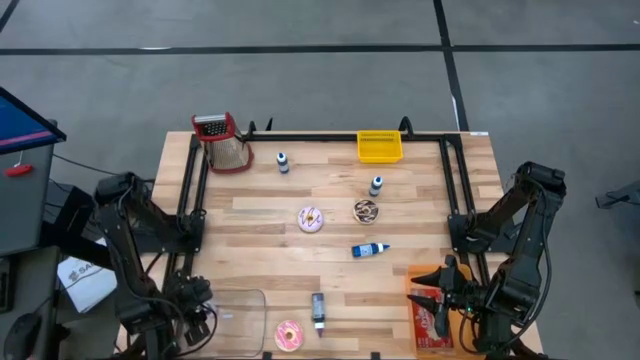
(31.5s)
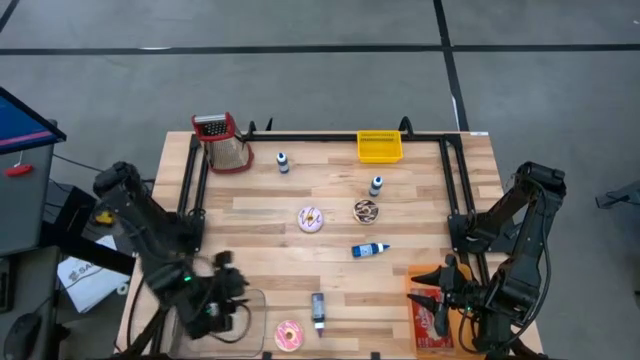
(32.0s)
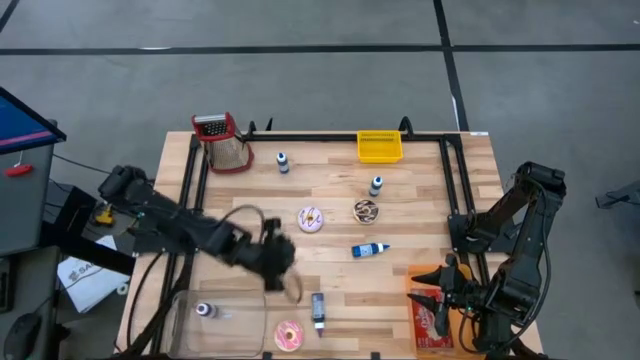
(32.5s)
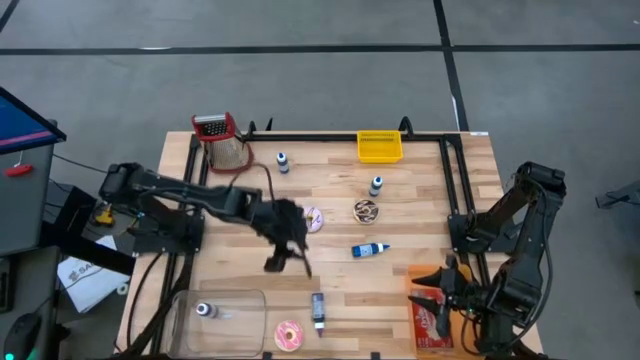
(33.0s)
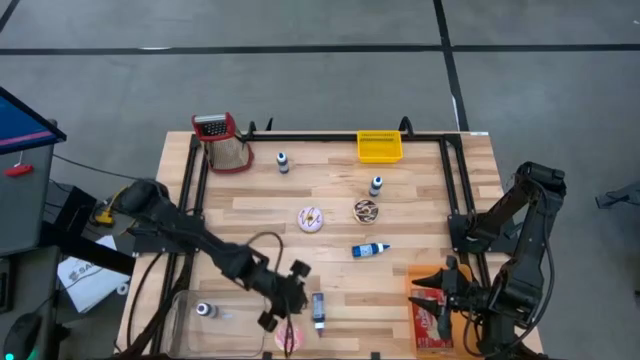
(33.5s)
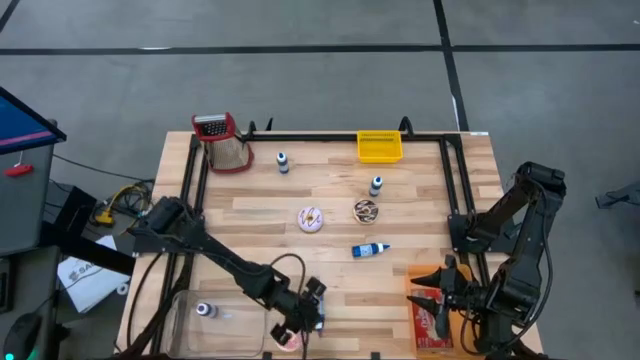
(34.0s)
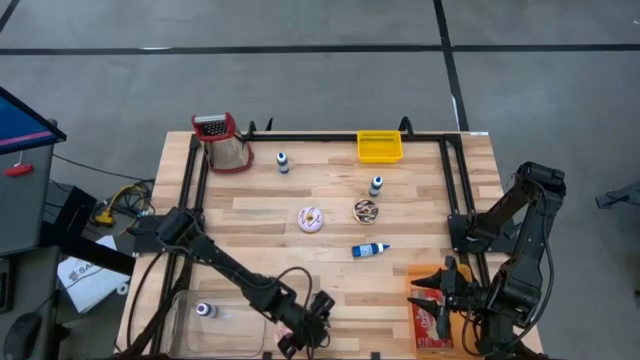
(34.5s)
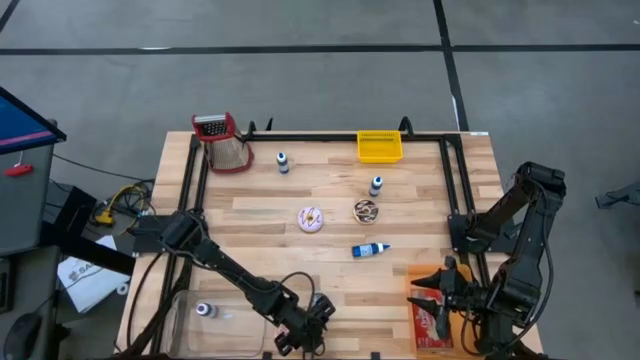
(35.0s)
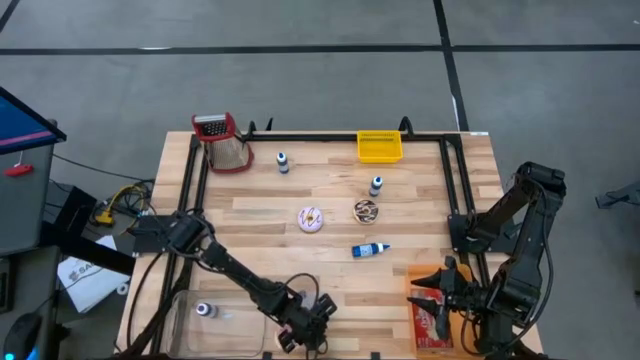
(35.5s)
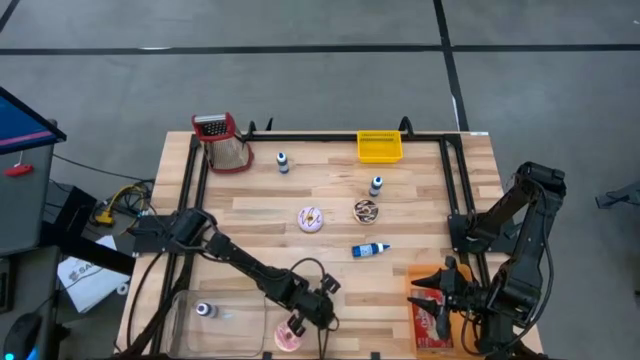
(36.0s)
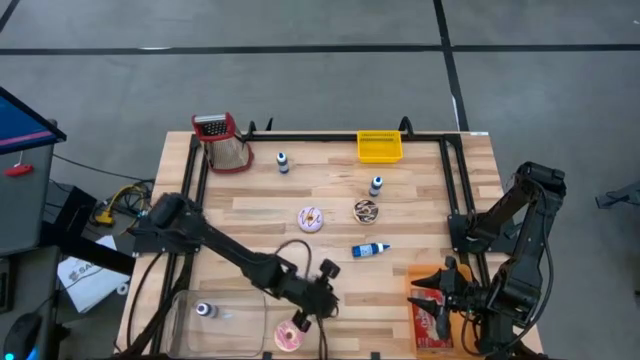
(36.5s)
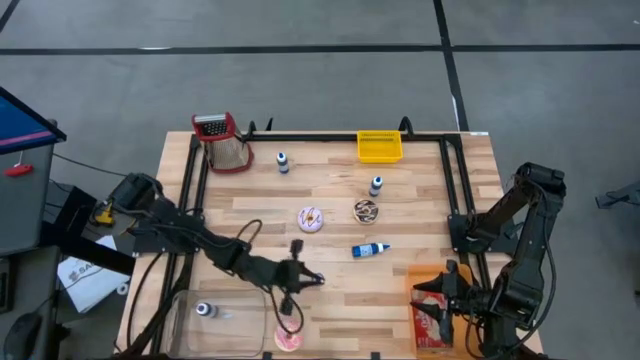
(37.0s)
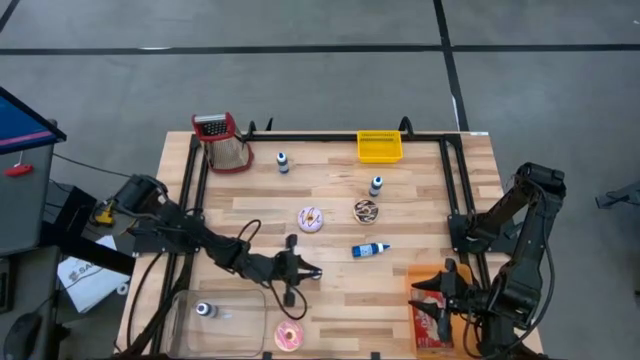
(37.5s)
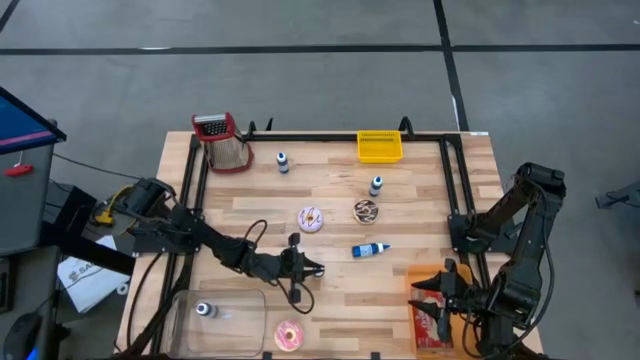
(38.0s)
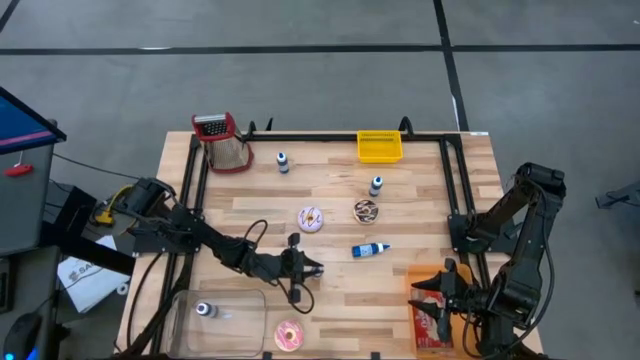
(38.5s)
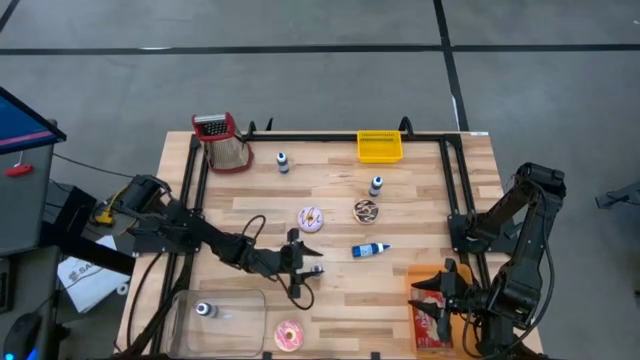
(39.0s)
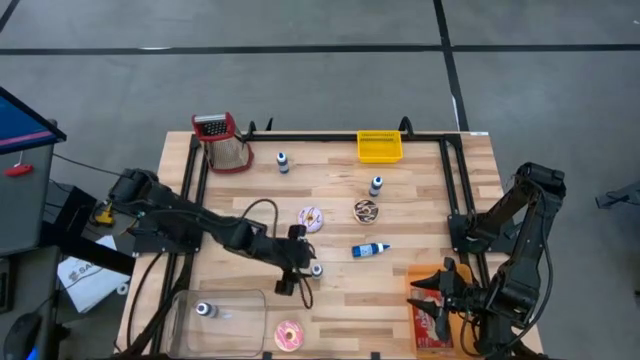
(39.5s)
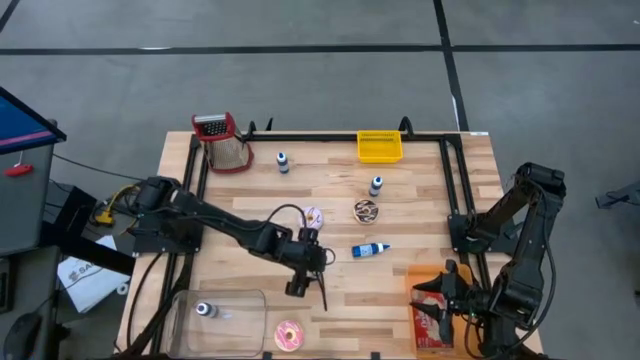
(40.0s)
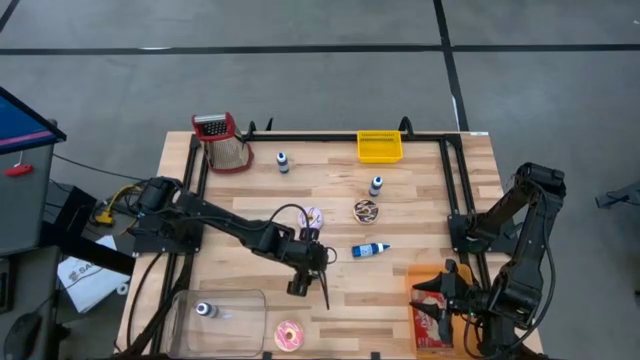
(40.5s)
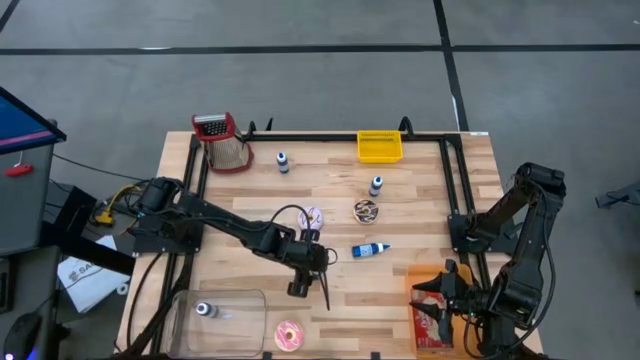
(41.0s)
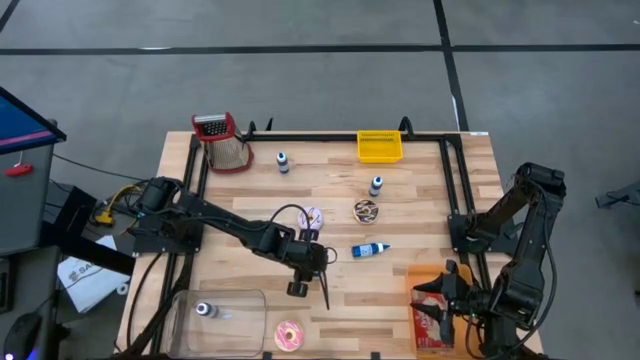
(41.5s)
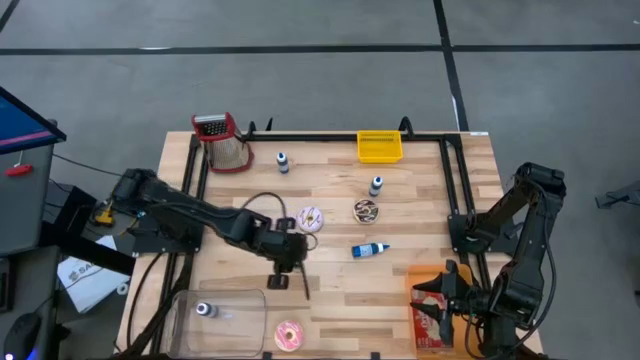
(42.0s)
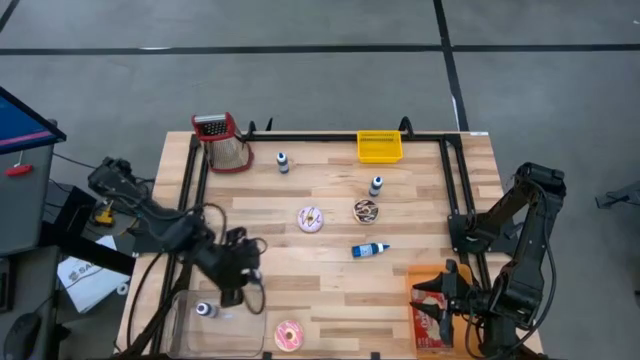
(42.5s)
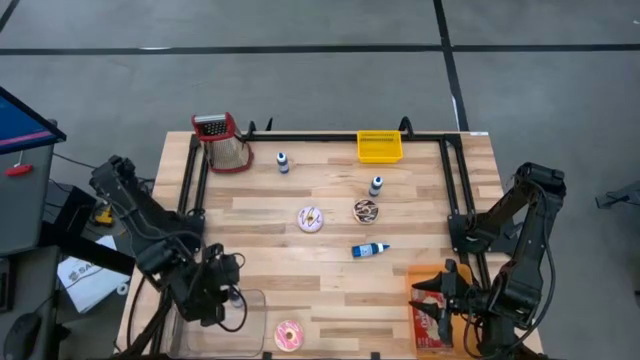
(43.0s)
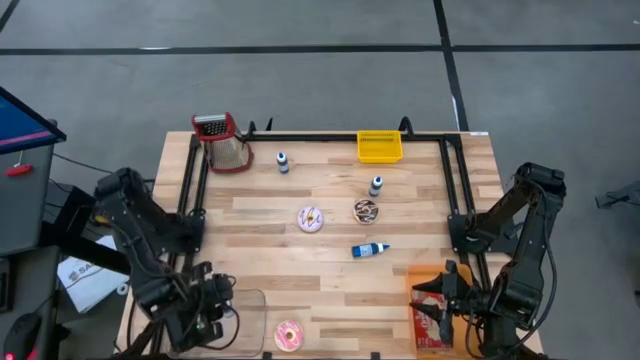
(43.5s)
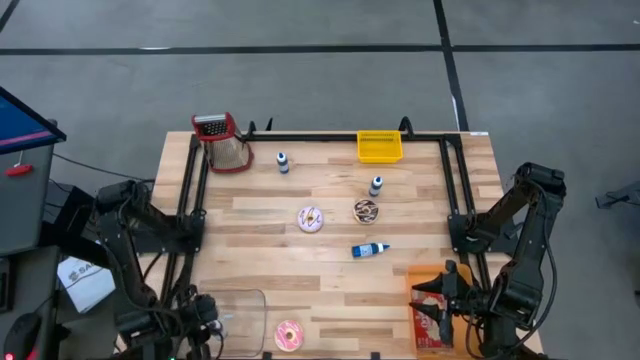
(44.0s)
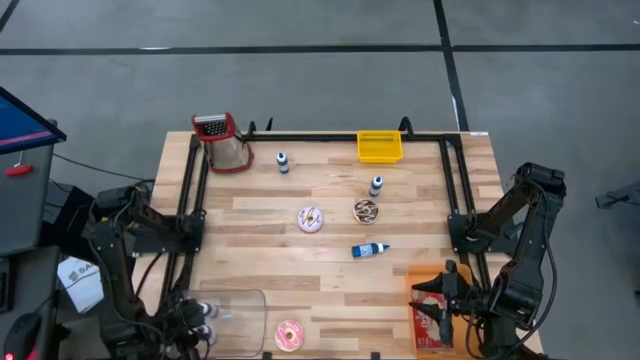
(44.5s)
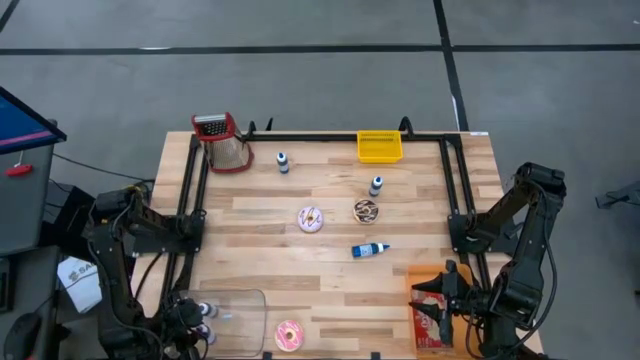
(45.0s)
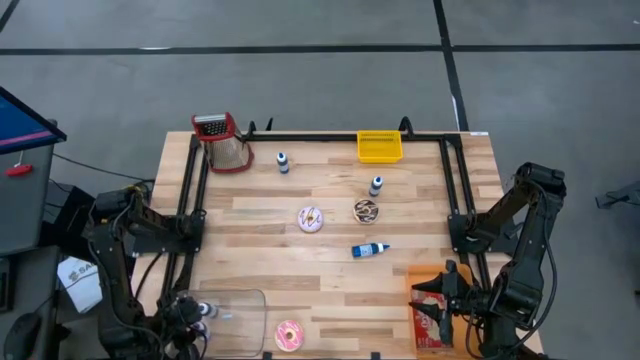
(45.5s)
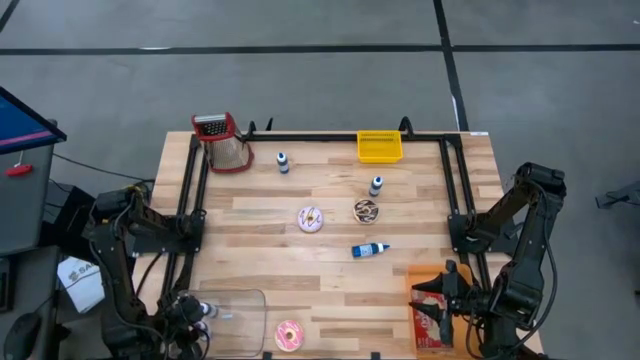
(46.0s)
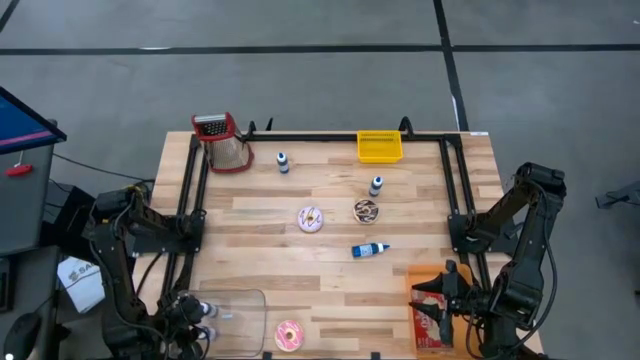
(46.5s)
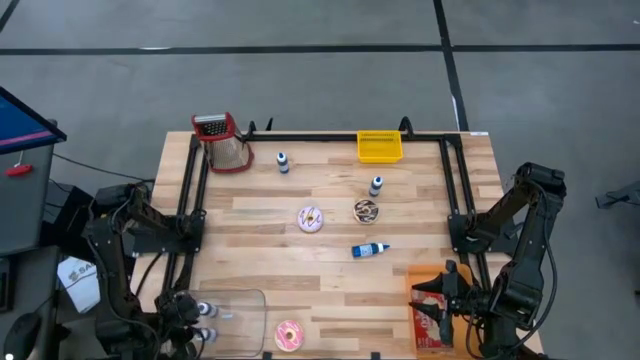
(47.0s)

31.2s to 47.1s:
Put the violet food coloring bottle into the transparent bin

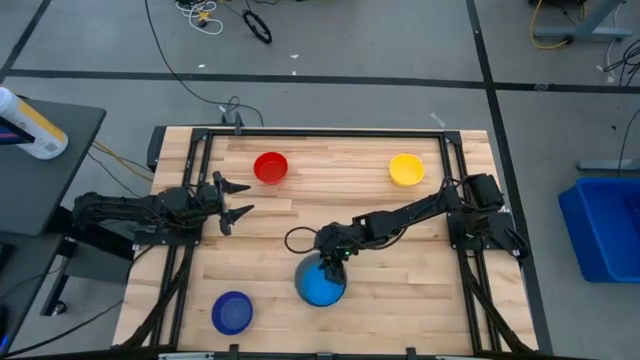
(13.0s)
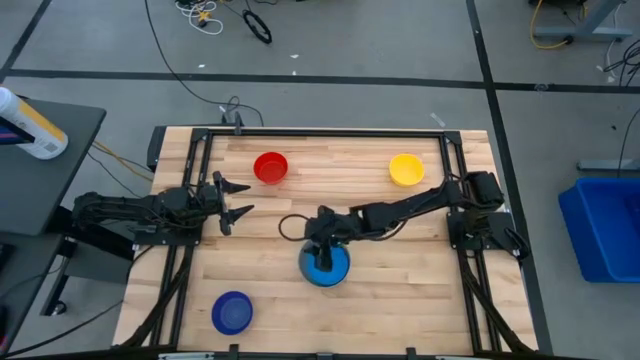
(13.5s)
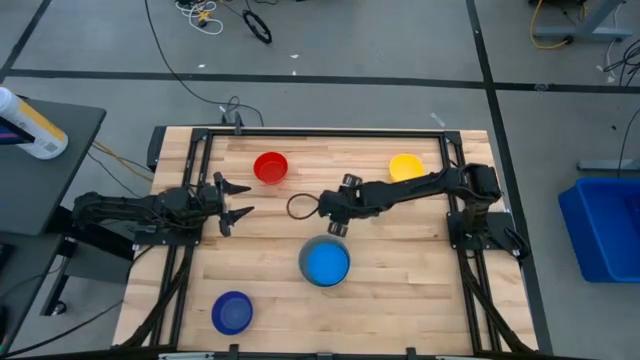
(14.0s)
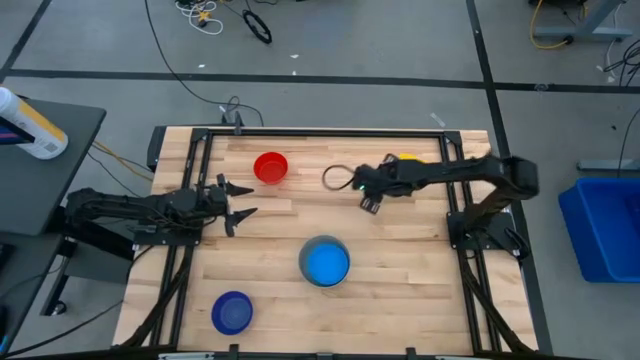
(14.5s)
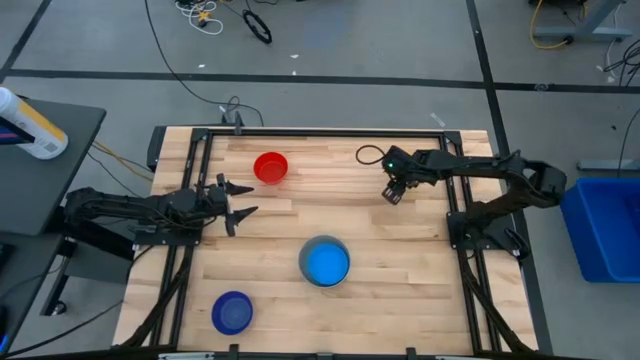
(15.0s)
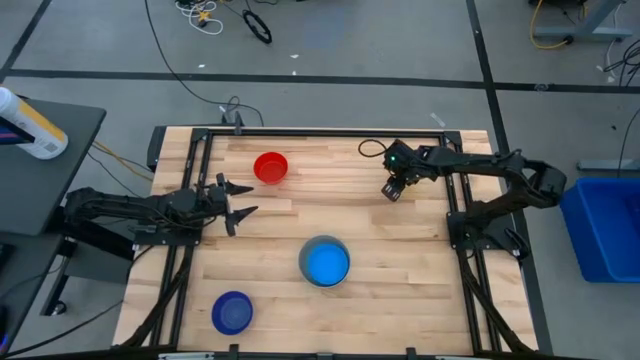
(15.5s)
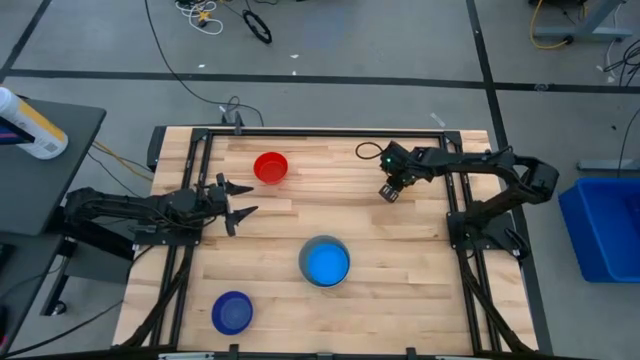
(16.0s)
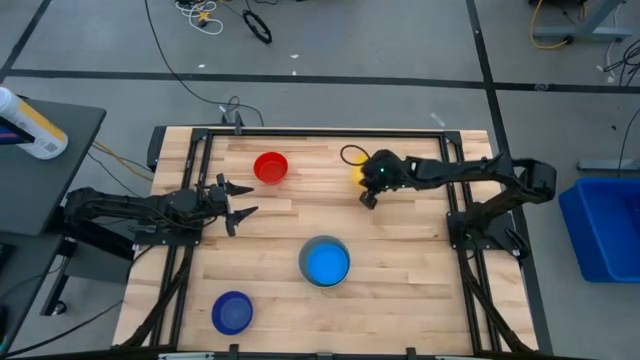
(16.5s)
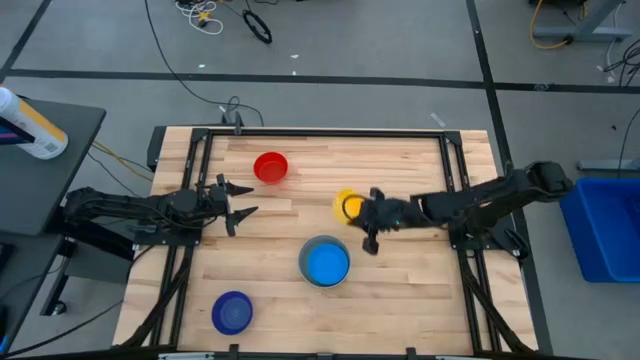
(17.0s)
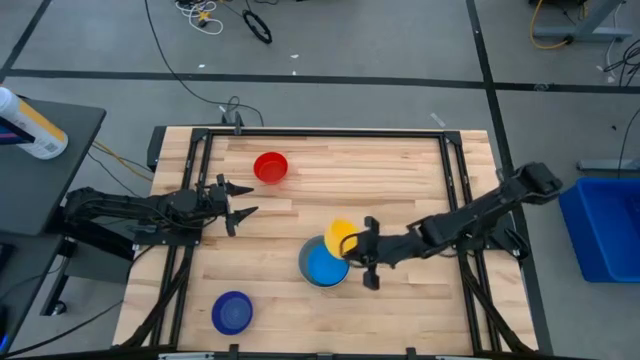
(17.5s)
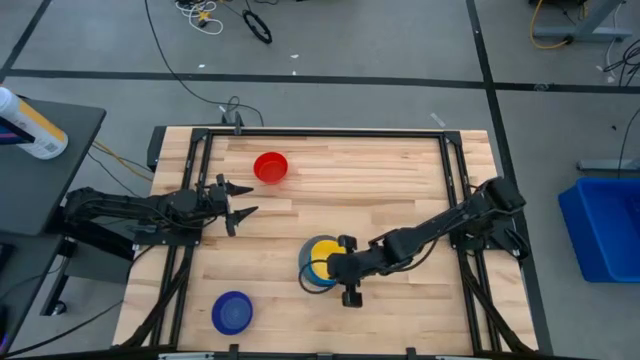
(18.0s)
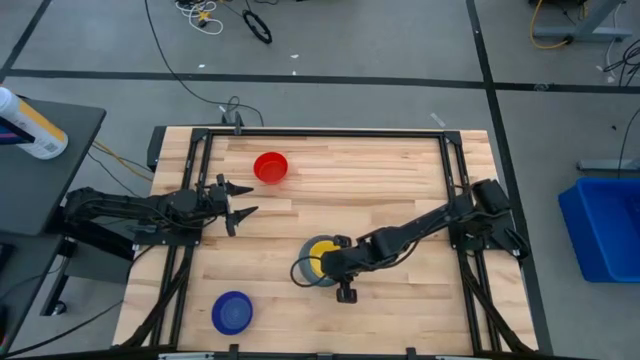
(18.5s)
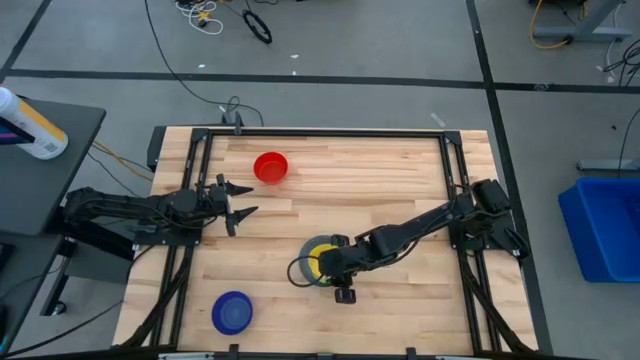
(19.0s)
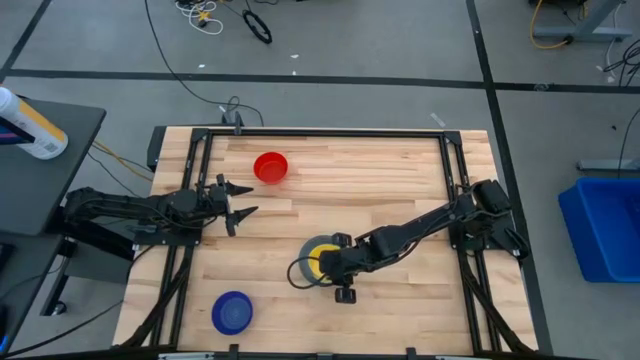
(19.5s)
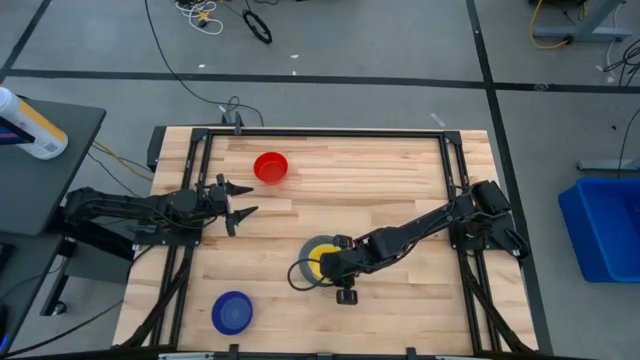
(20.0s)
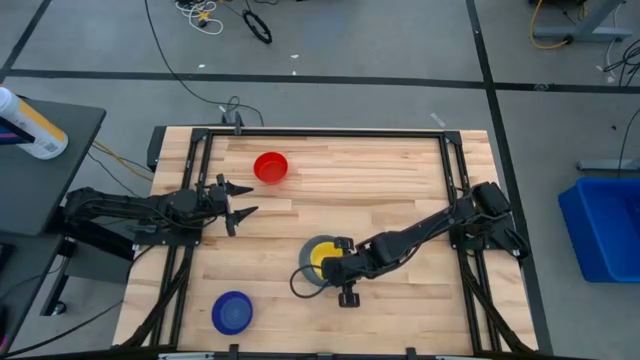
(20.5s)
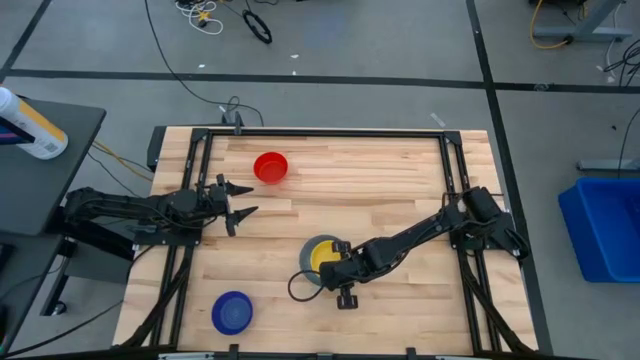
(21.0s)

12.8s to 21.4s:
Stack the yellow bowl on top of the blue bowl
